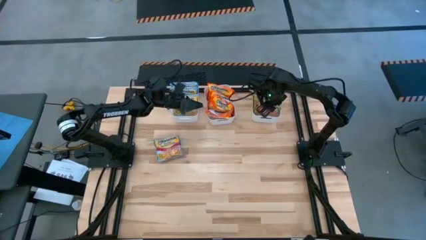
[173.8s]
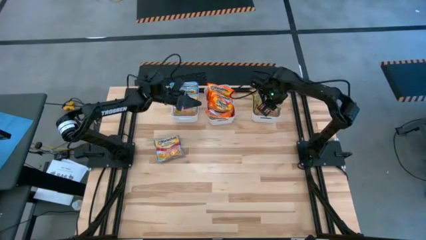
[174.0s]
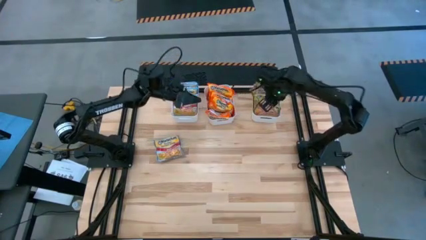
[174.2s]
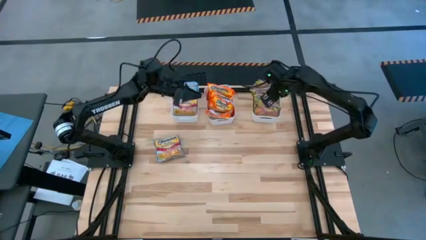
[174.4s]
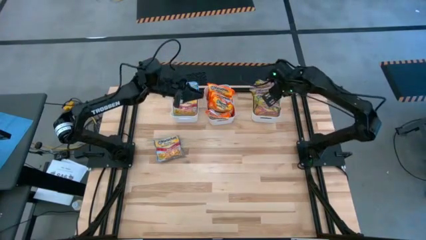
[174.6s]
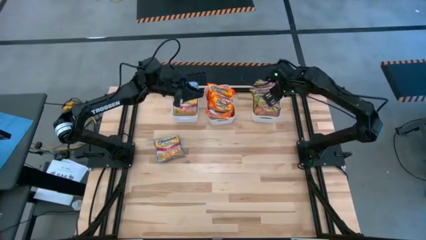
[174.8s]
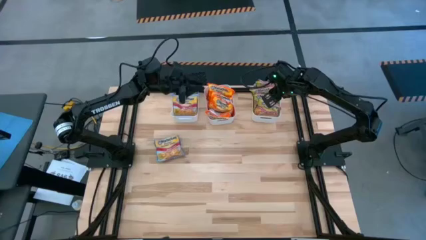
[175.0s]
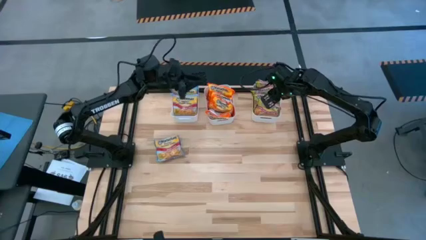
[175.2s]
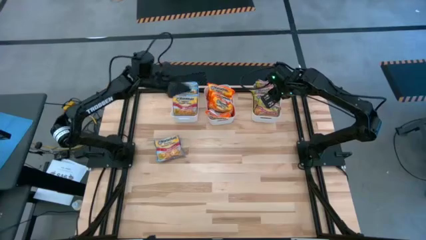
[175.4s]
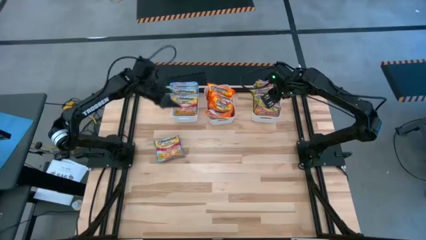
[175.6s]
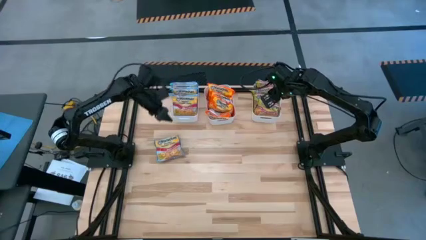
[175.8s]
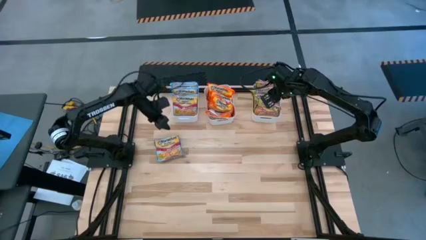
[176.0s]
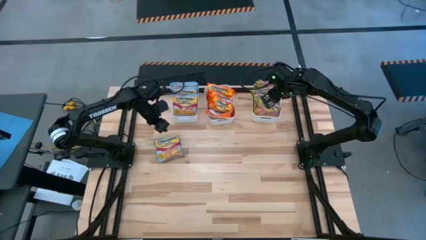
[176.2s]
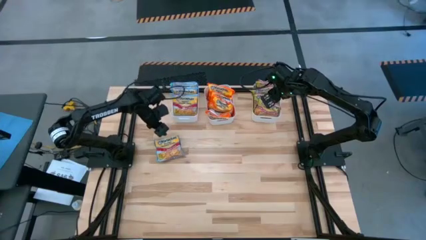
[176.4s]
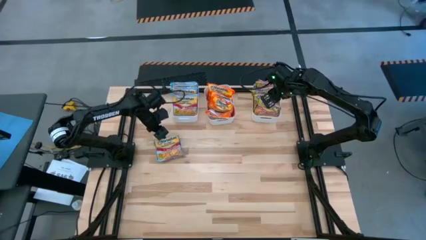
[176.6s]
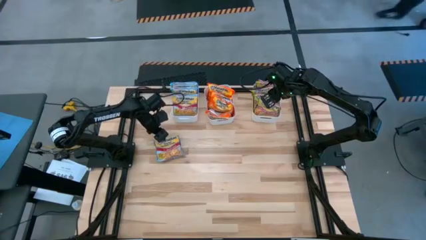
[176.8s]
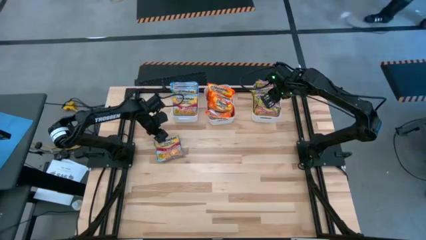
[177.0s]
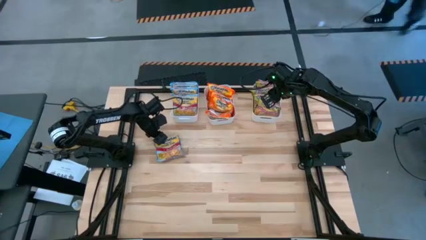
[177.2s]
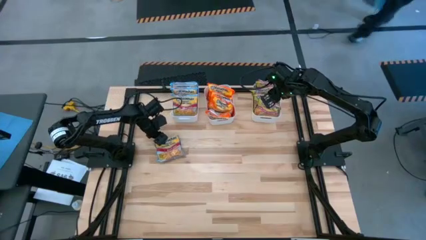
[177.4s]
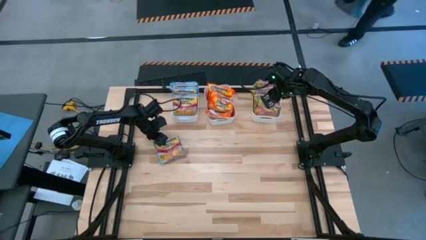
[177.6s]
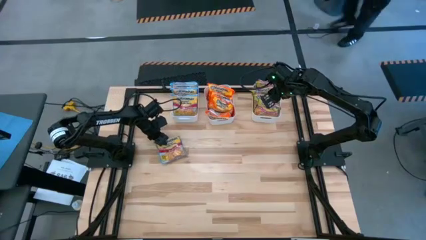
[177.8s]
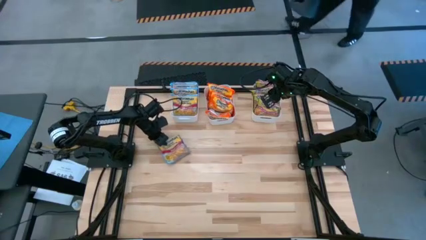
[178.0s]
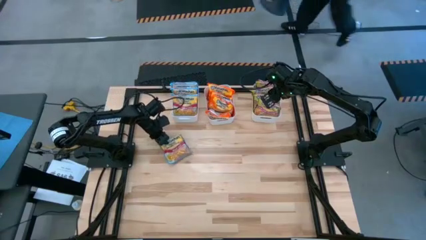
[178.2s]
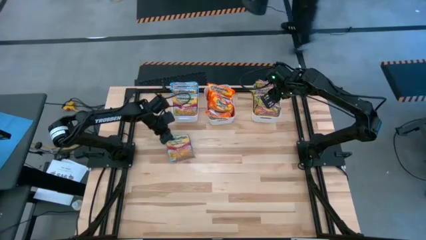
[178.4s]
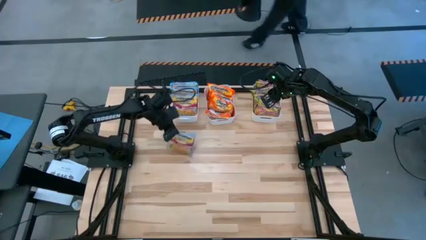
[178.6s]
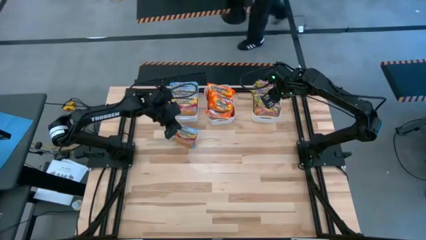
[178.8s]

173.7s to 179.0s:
Task: Sort Maruchan noodles
Put the blue noodle pack into the left white bin

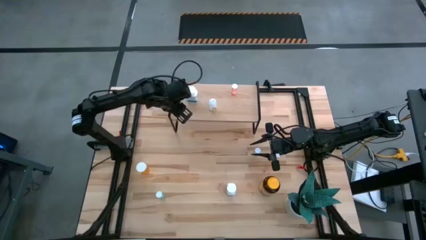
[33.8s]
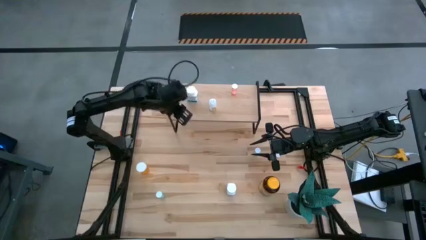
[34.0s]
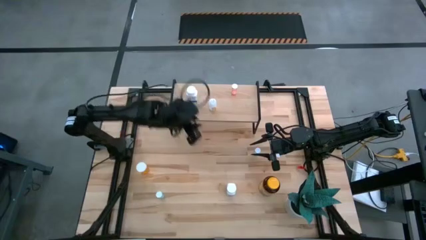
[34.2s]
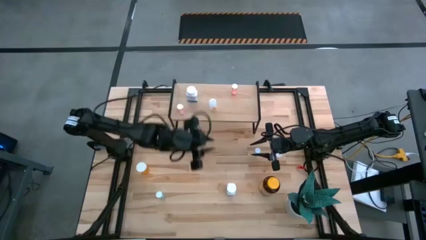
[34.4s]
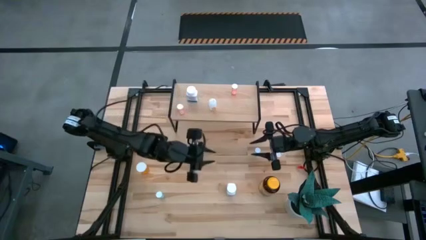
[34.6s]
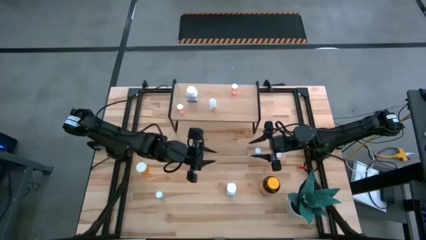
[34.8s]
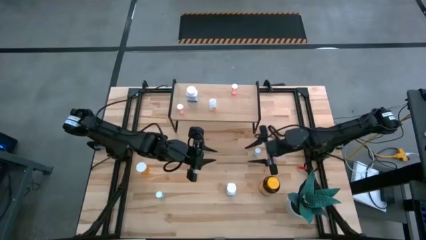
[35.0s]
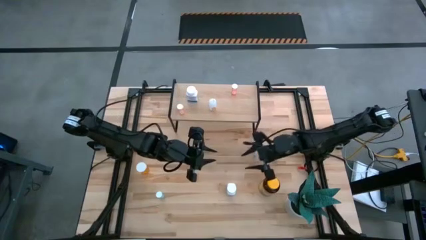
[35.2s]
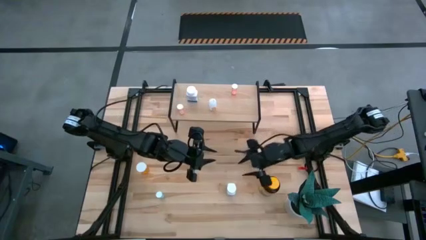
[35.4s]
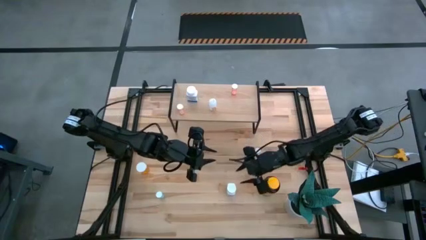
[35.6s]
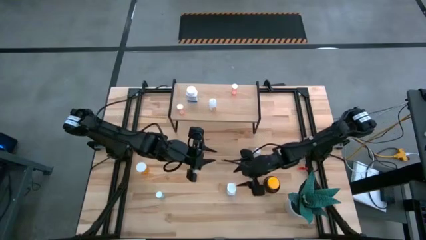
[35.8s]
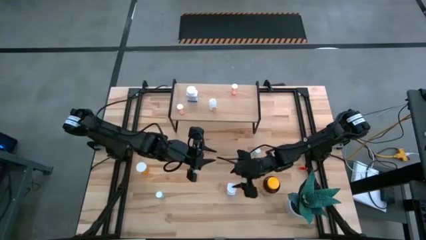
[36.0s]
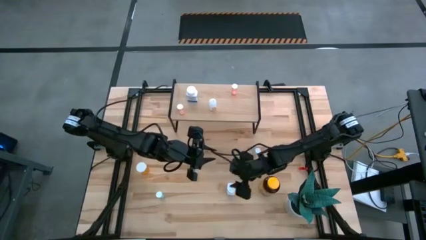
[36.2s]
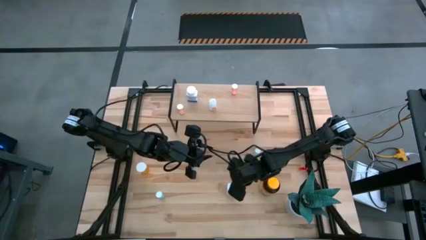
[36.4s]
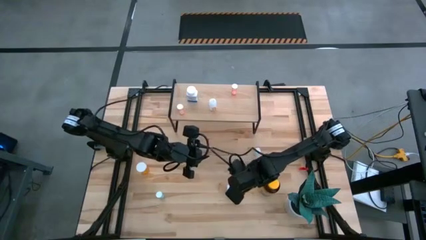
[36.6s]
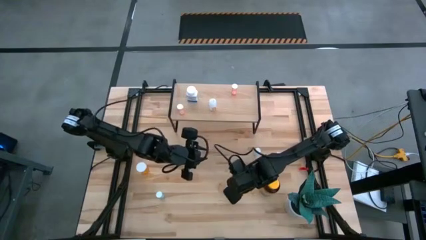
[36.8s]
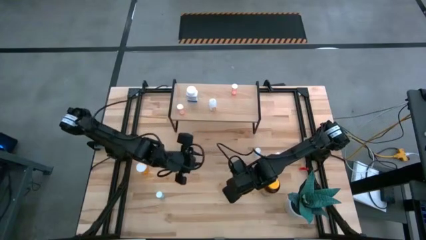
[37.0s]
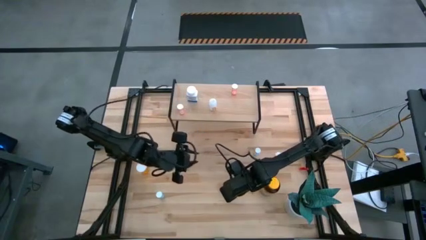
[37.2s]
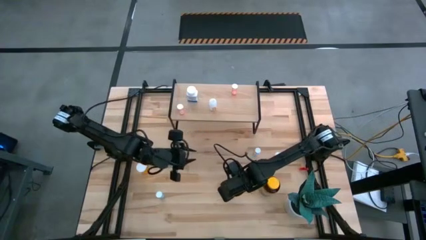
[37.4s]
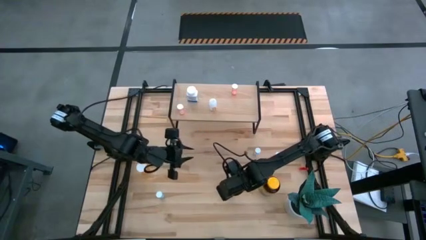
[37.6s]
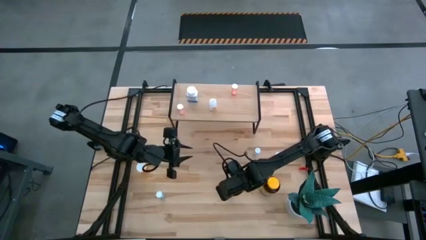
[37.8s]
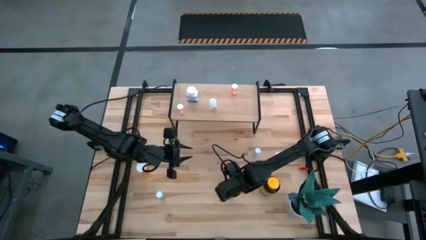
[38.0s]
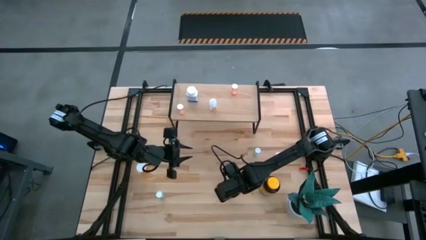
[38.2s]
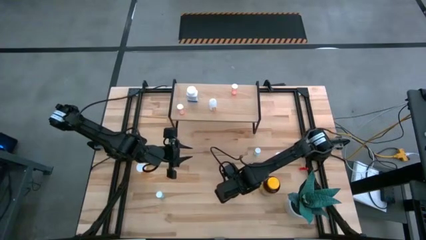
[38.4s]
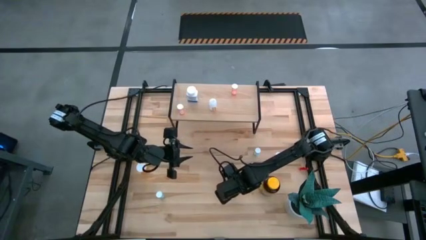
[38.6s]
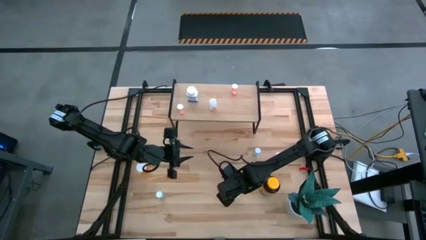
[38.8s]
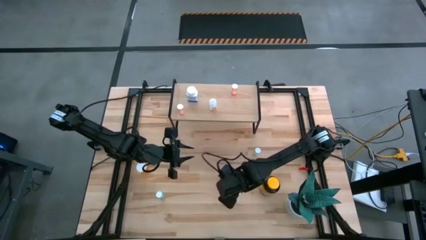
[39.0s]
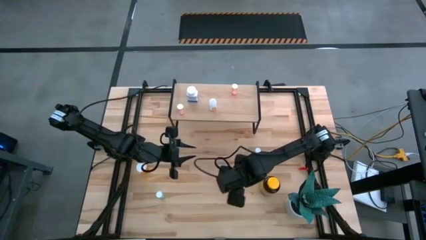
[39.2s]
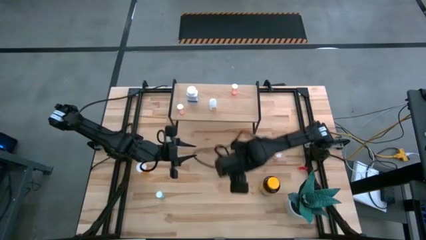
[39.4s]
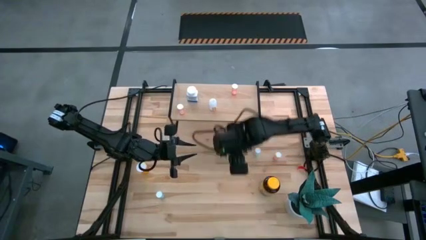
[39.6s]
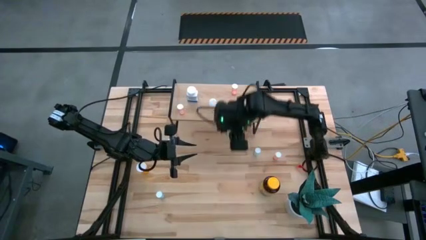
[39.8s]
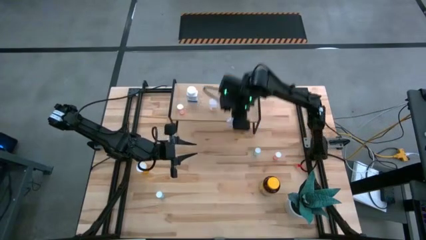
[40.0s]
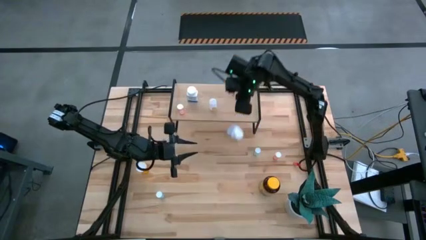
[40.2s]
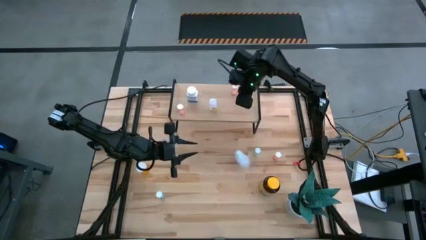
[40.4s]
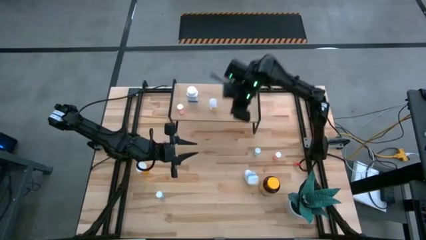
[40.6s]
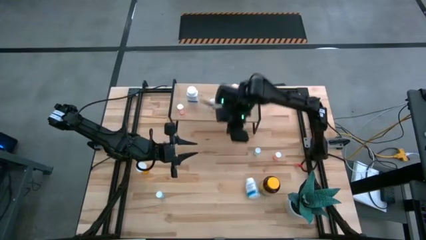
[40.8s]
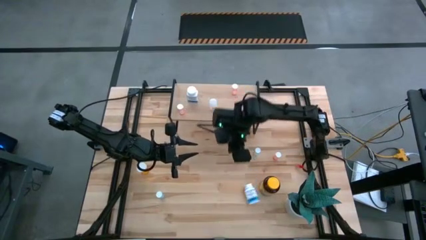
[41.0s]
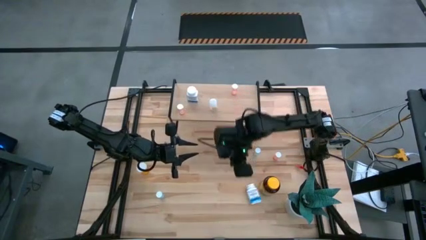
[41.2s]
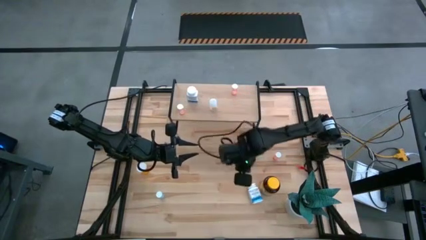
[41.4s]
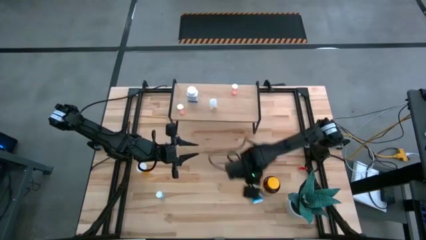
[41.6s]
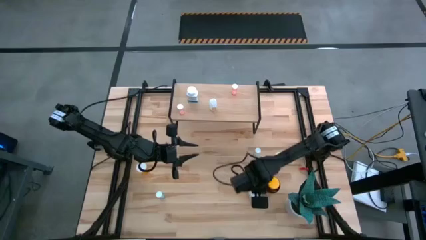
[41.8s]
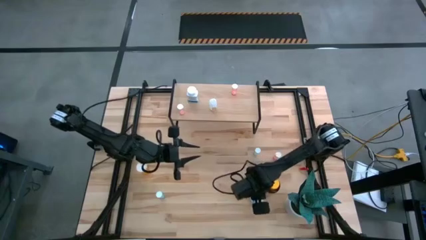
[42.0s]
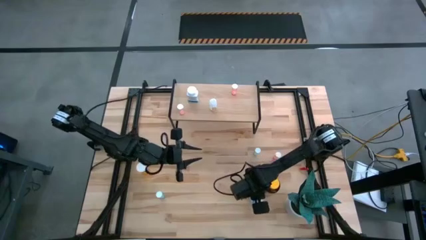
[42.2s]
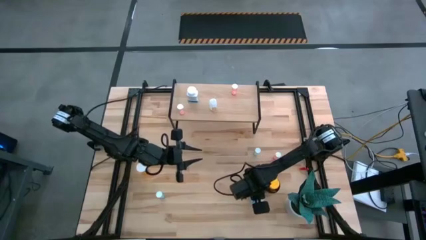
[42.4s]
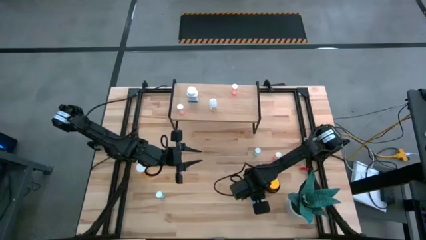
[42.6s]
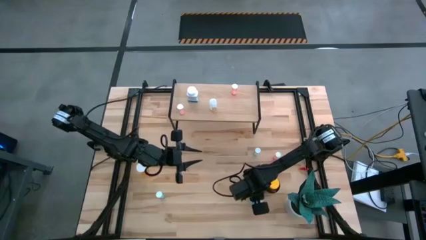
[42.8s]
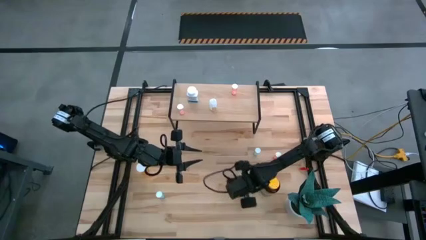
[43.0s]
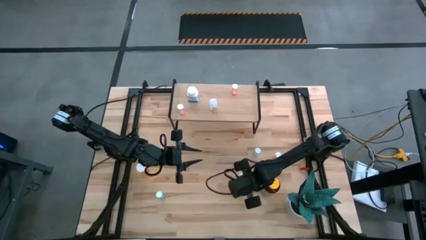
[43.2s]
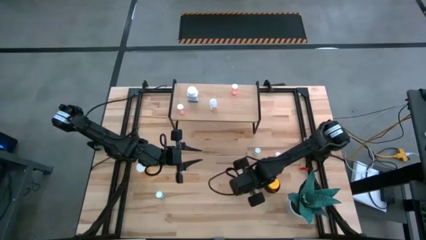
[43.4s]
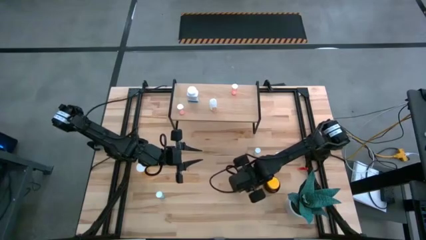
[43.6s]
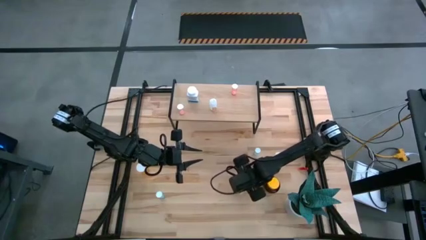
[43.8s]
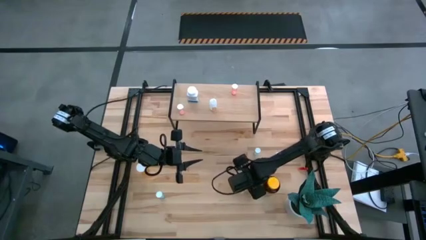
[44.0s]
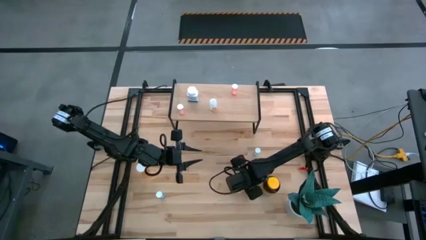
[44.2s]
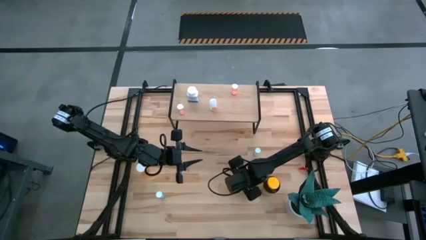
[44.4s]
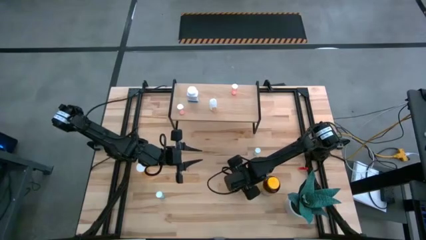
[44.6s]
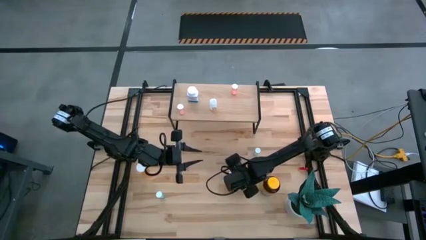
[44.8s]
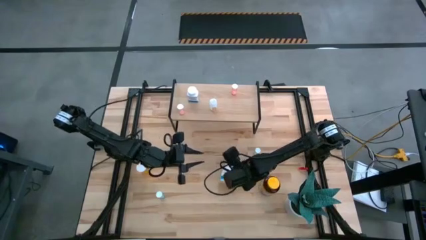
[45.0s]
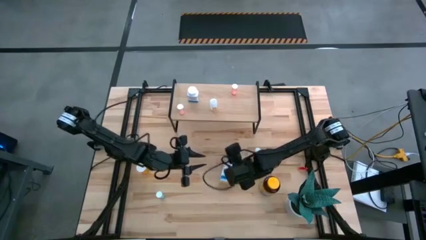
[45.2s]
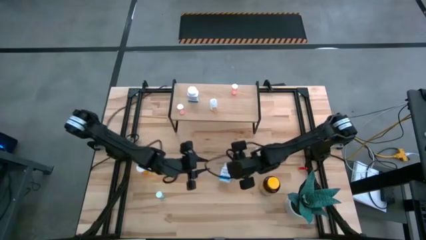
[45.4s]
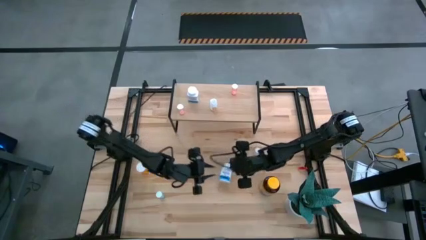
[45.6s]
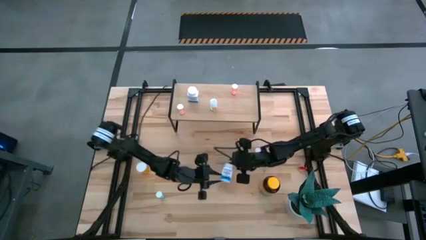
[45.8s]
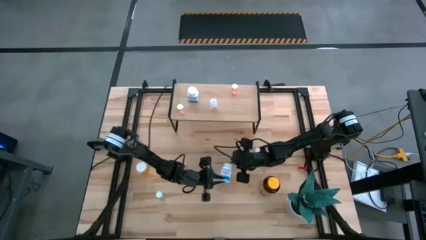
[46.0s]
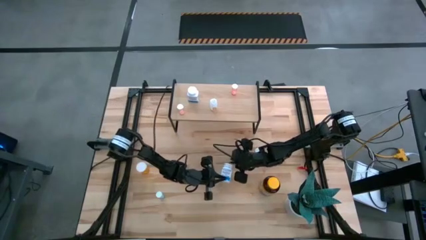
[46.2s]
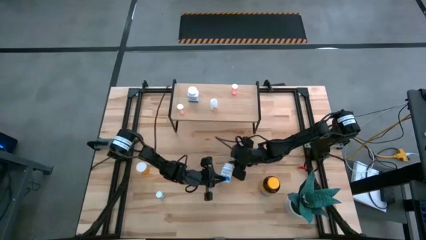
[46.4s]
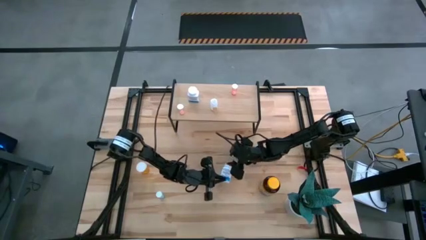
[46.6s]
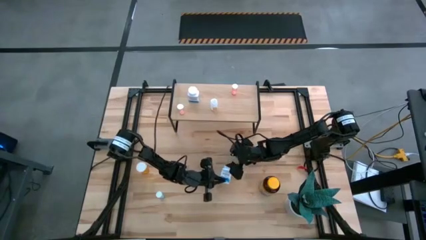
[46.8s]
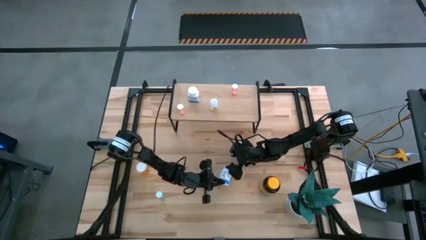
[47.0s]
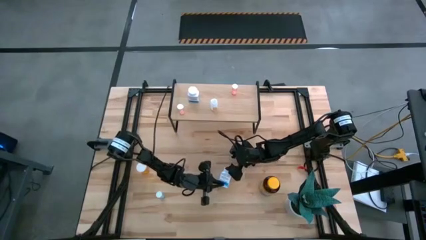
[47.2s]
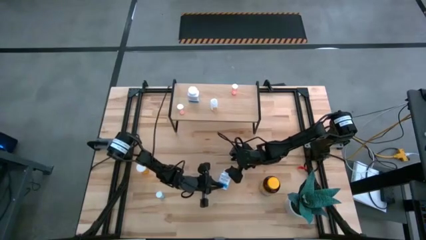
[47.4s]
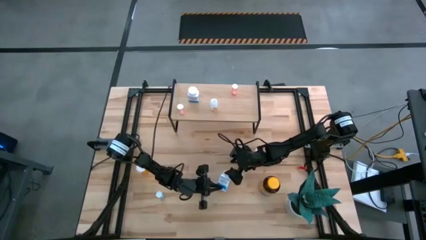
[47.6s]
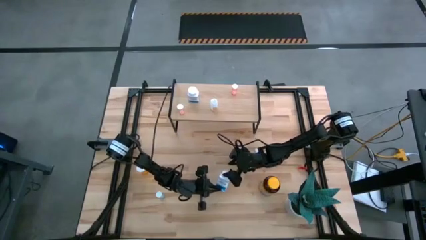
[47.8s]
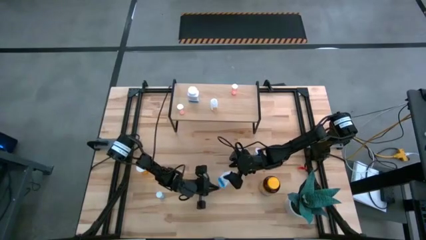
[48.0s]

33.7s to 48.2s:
Task: Pick and place medicine bottles onto shelf by color
Put the white and blue blue pill bottle on the shelf
